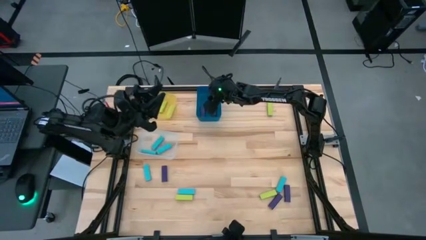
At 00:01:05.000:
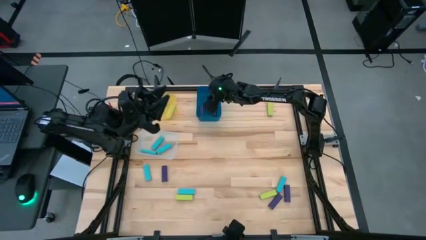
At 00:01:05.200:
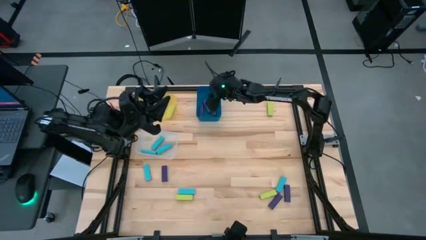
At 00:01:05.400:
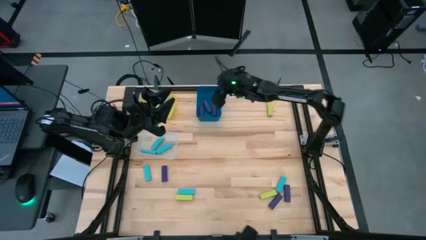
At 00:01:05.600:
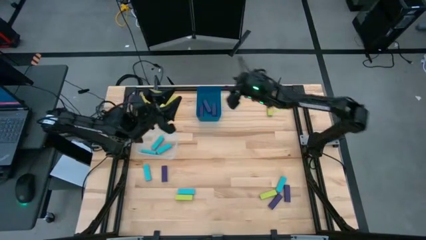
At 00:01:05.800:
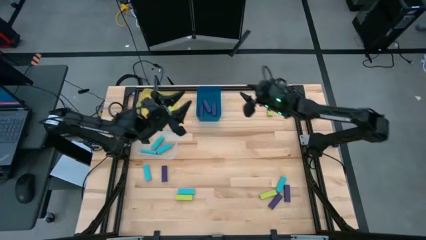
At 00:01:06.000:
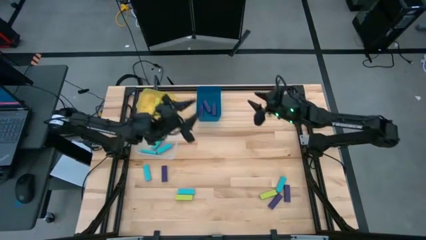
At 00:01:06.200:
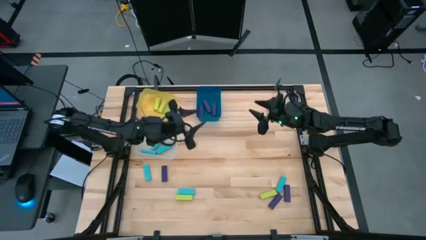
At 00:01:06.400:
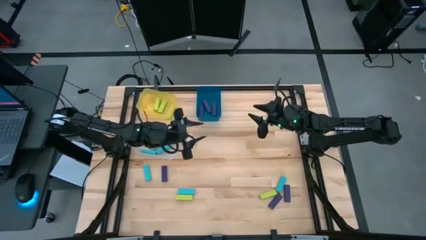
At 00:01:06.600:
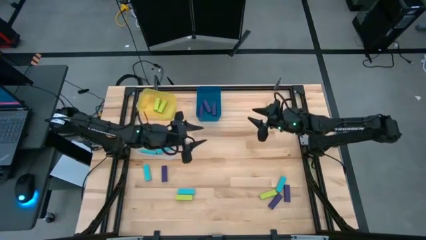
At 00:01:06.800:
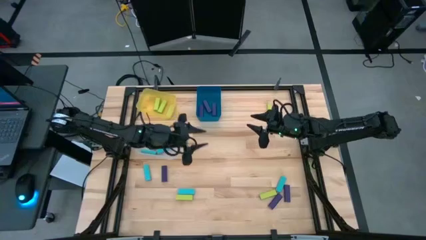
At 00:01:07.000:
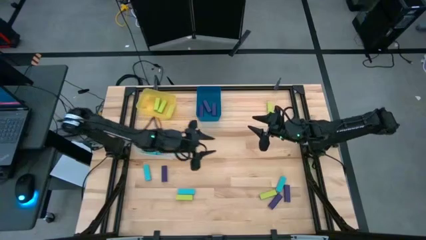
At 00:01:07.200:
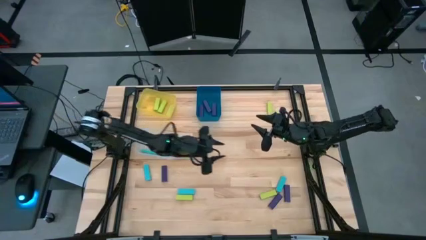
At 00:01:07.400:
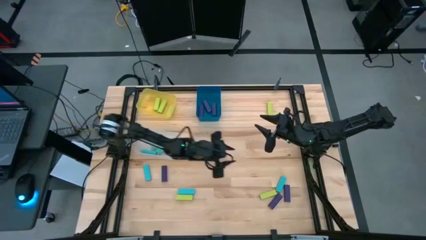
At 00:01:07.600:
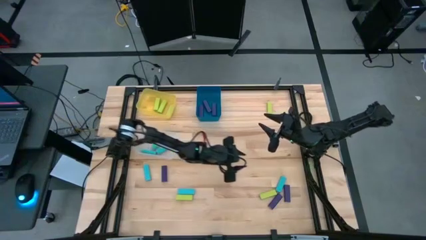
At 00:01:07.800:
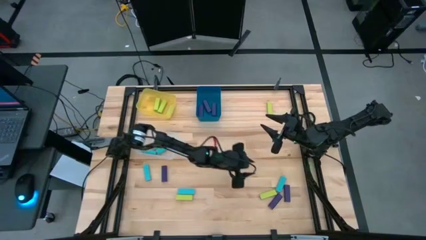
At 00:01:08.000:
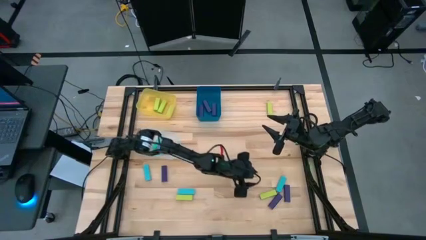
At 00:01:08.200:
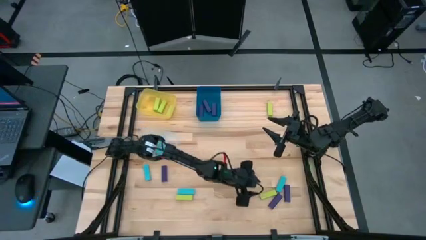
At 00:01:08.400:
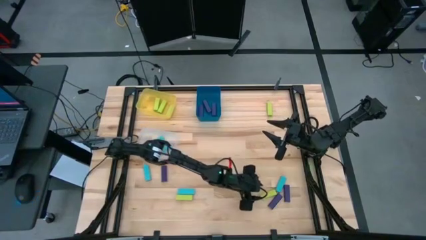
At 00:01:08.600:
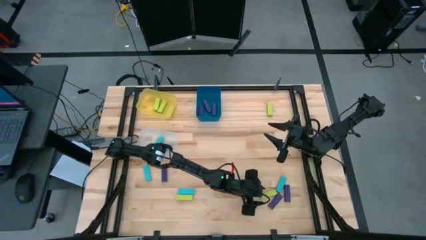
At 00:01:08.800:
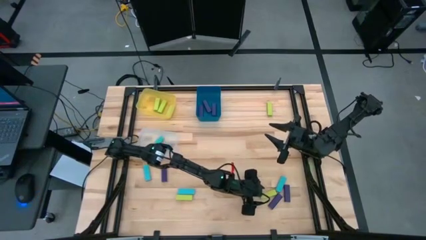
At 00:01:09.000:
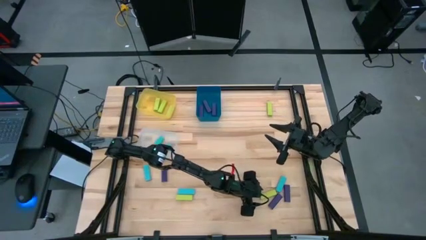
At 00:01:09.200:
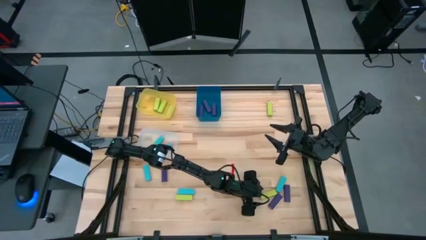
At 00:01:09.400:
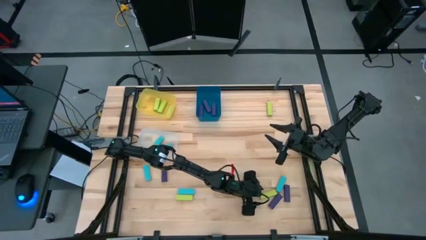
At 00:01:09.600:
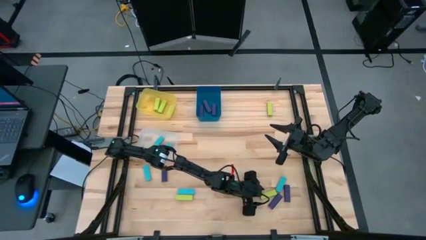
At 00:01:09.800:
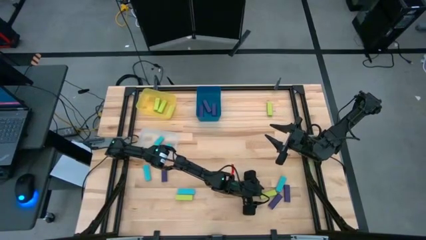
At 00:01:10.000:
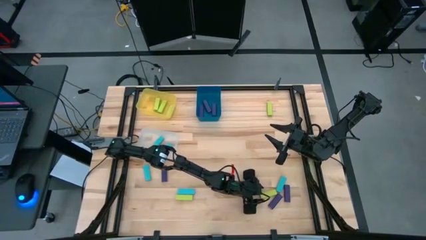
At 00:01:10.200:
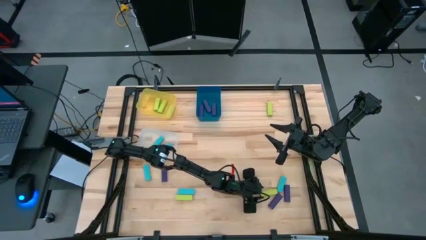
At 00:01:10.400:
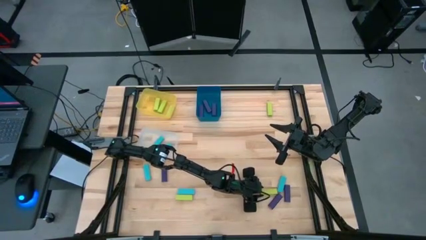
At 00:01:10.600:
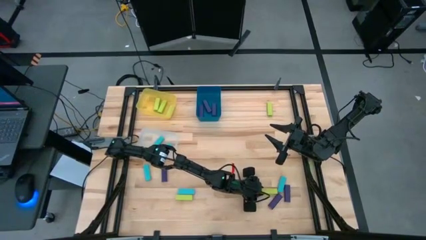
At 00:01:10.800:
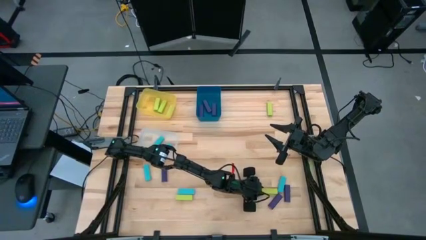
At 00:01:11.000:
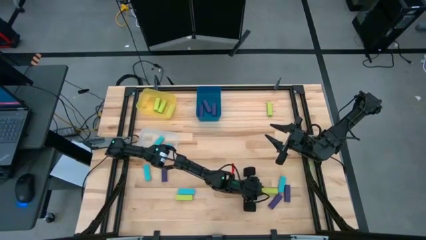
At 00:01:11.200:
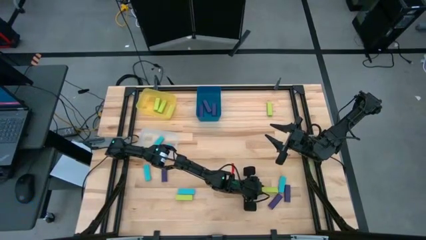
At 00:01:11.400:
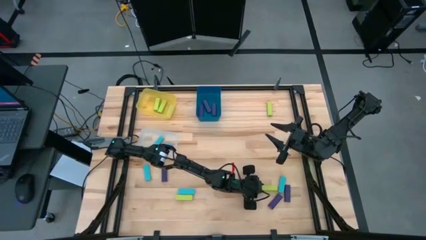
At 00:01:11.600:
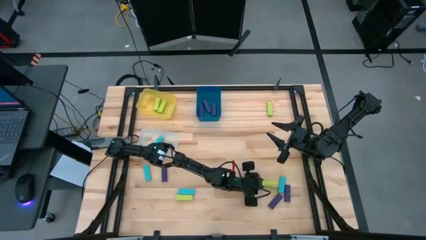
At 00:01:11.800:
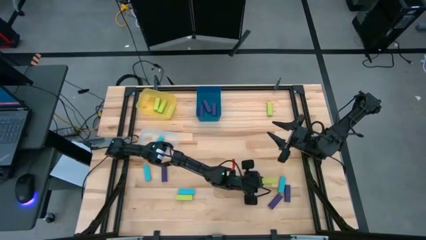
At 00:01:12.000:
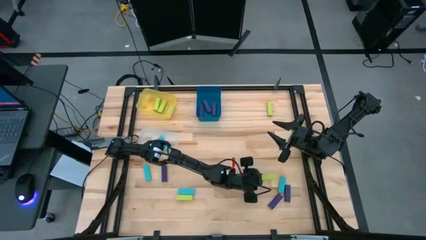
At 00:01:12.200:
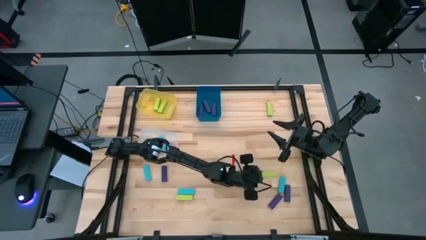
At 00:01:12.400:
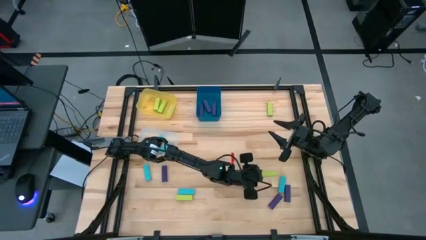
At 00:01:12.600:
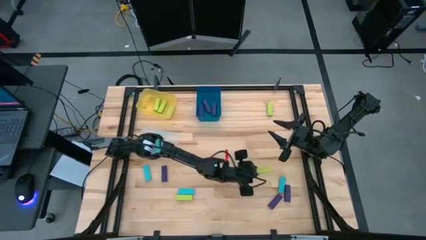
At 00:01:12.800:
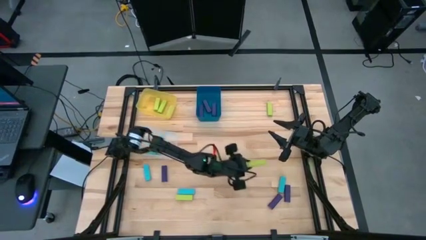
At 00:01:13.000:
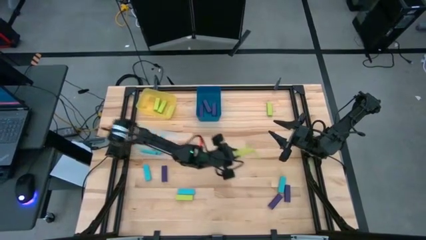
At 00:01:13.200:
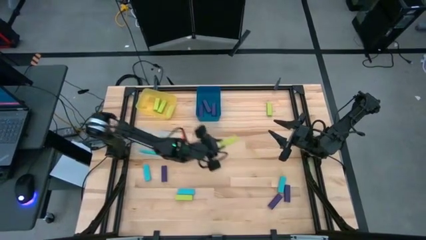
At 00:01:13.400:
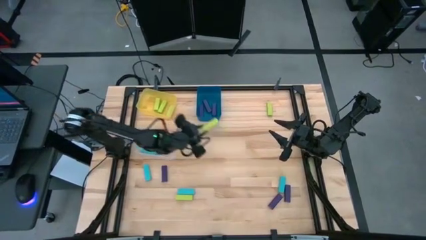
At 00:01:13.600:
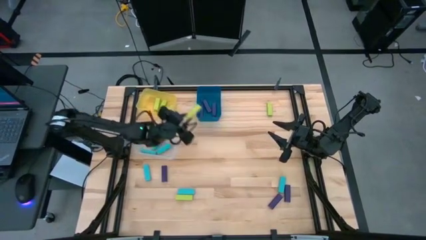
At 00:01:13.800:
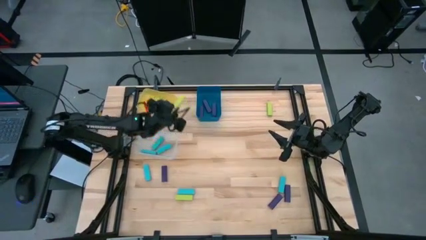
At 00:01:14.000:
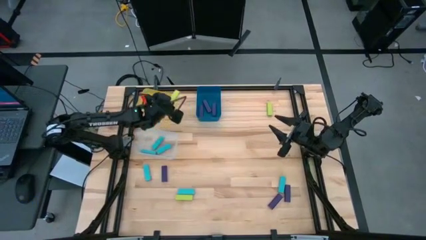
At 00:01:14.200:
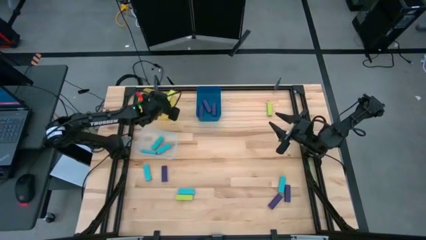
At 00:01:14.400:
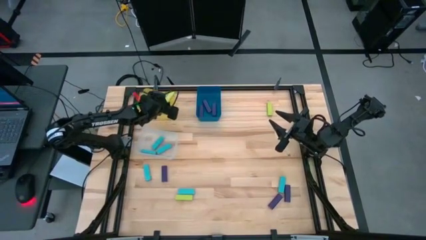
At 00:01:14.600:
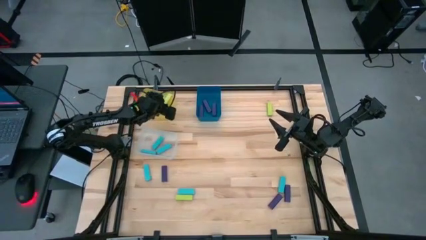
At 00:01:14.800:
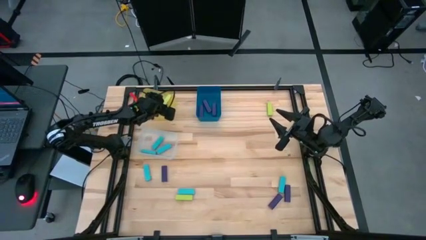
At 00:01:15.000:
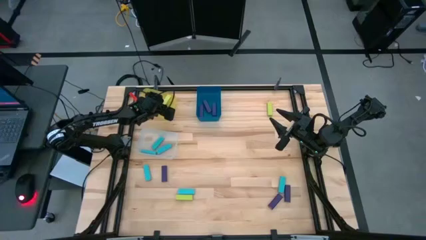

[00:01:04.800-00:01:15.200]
Task: Sort blocks
Put the green block into the yellow bin

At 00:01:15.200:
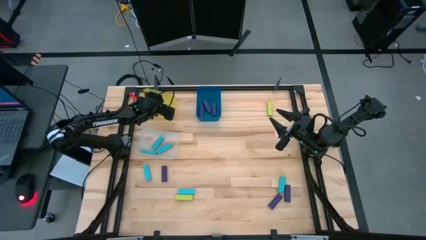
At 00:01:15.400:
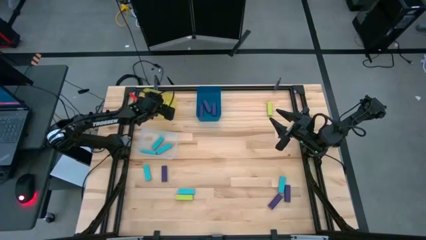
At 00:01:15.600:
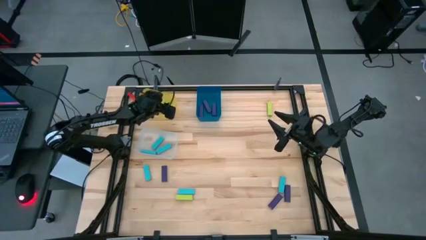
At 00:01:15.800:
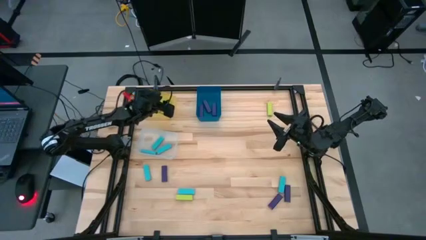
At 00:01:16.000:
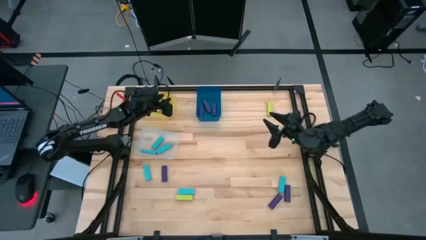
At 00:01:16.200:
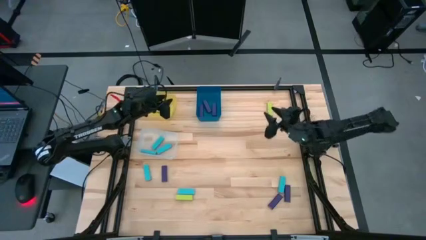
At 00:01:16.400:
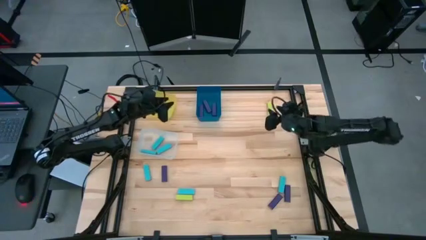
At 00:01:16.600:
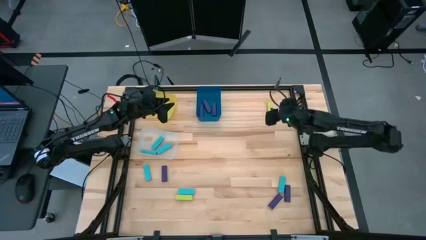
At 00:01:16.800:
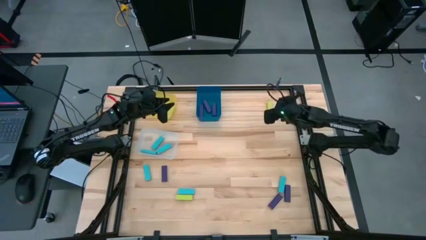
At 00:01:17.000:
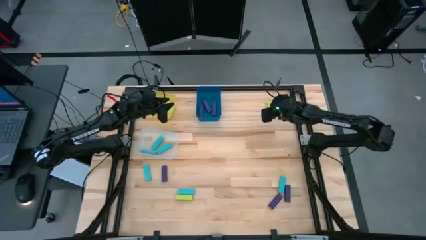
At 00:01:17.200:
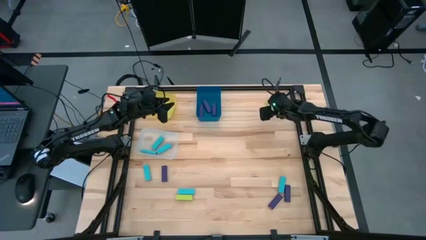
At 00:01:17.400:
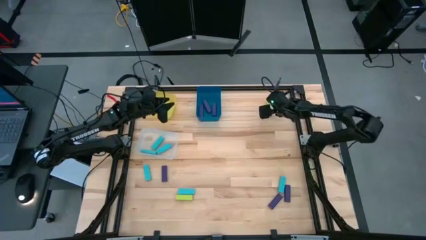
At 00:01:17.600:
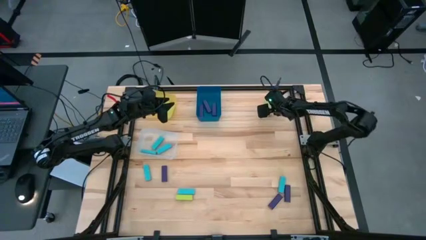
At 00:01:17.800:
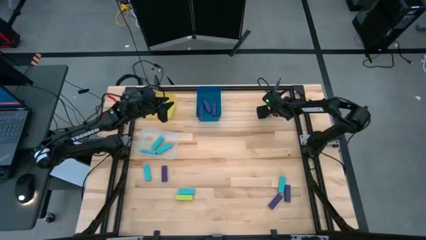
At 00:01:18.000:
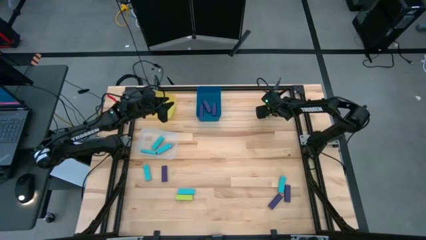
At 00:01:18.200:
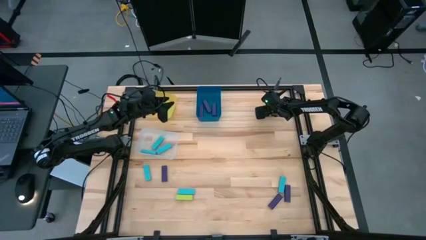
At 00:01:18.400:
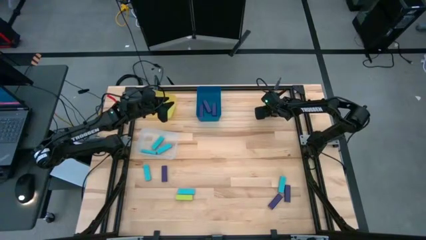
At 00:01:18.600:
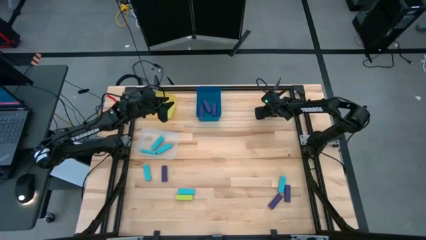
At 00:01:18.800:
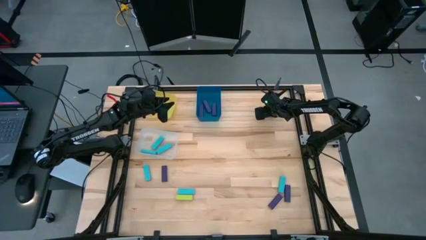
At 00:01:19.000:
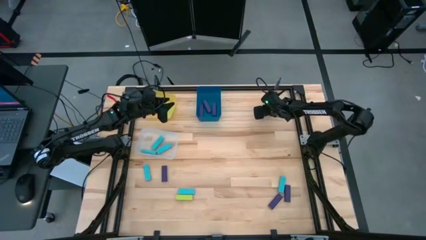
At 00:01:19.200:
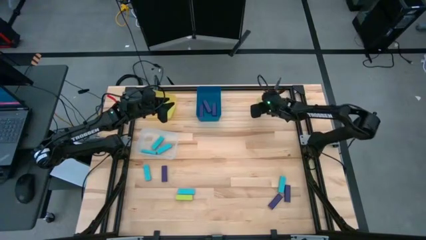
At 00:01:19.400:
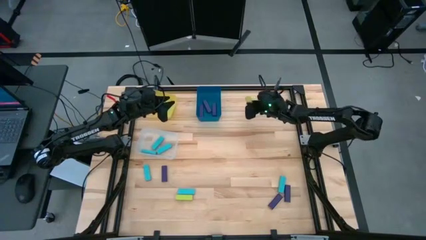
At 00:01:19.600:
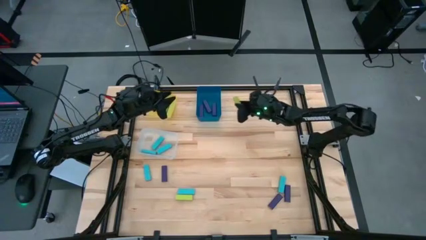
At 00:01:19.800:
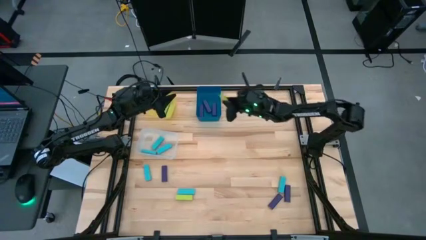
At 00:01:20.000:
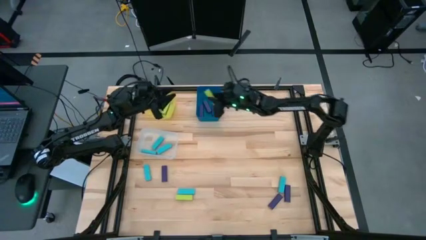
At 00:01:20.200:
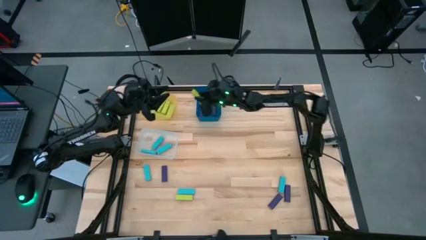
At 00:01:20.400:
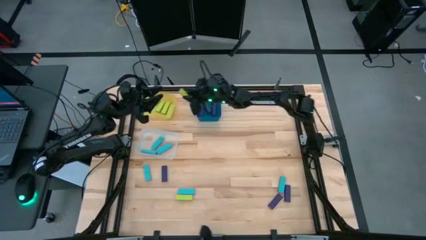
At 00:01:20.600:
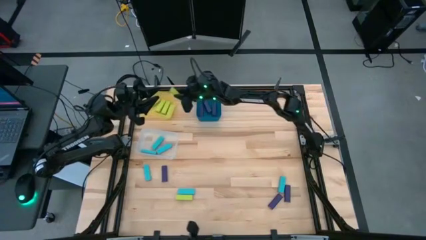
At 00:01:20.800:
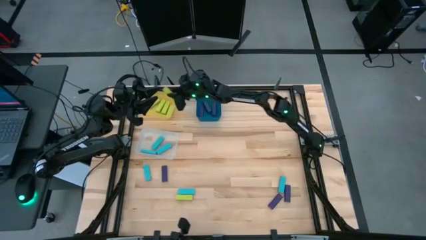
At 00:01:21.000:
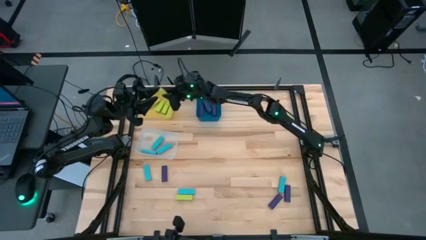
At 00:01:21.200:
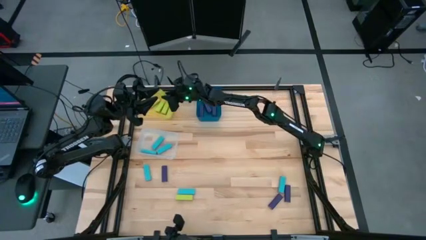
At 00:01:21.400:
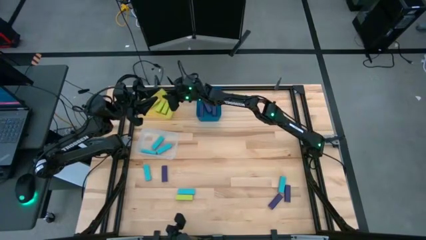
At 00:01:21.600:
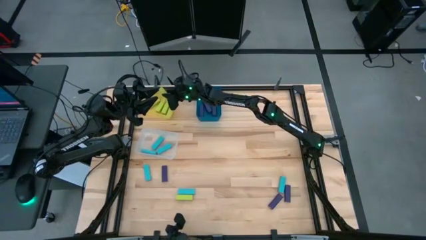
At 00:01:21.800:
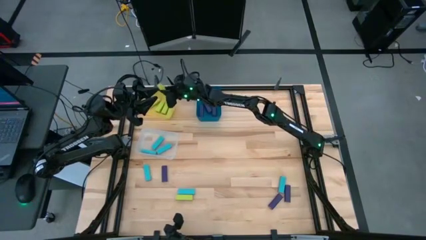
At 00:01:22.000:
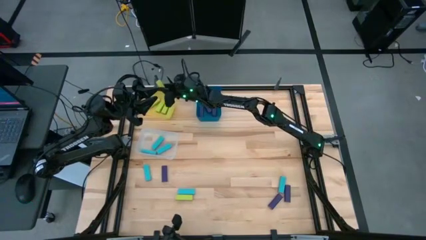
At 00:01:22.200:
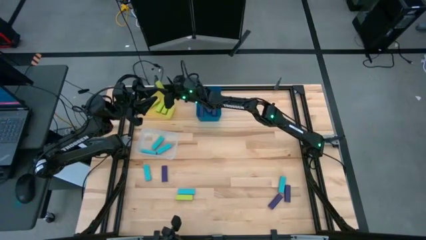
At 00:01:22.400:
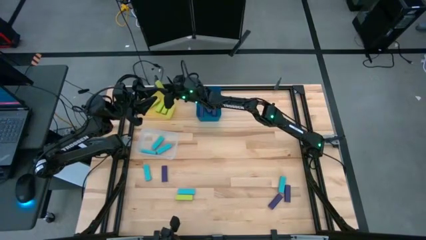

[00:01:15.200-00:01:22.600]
Put the green block into the yellow bin
